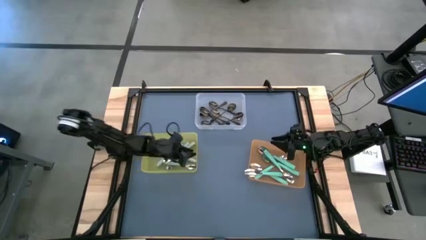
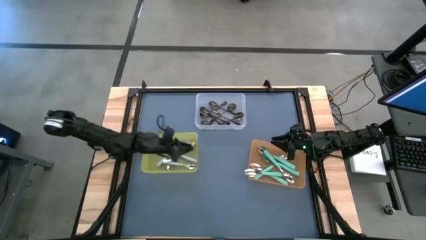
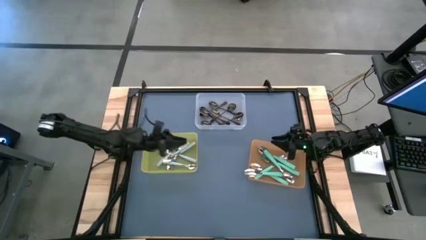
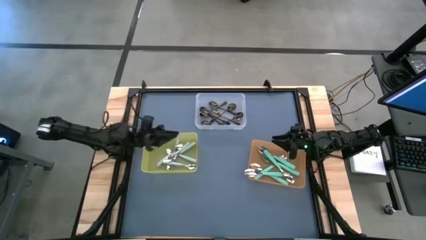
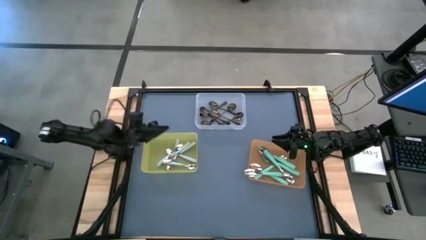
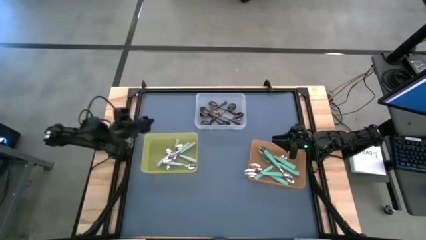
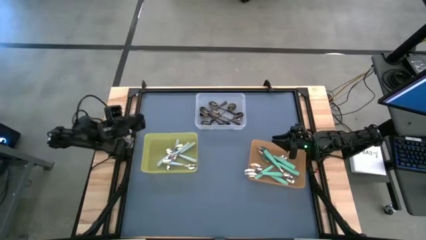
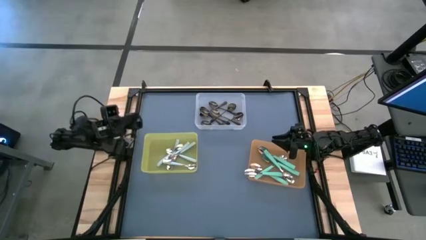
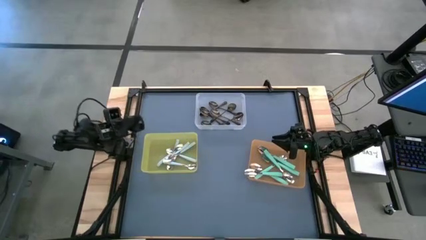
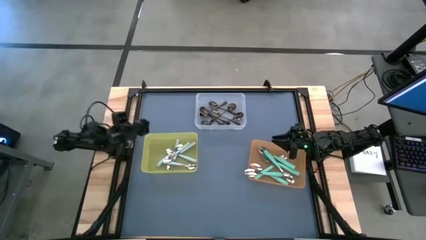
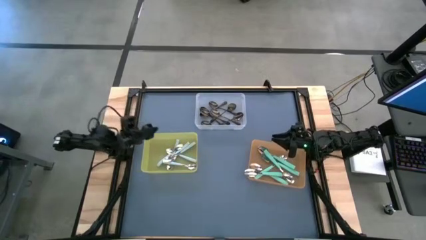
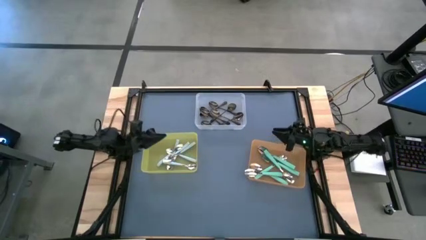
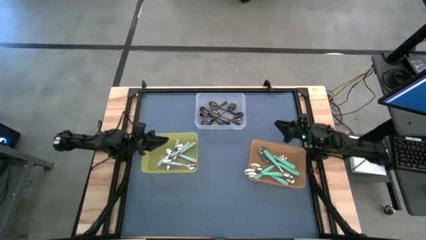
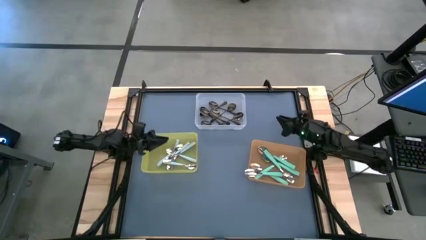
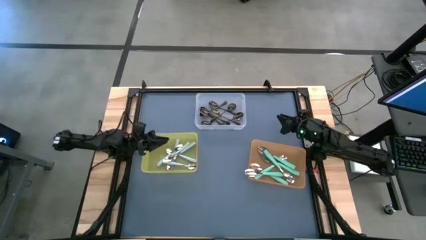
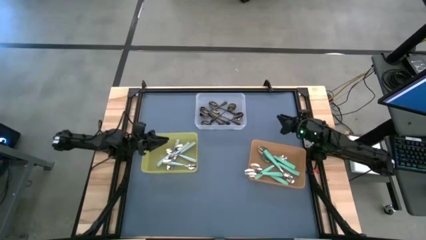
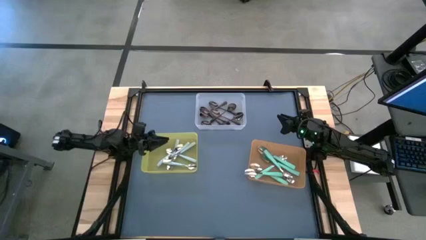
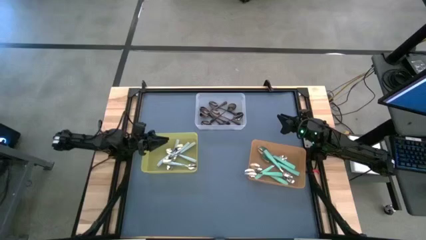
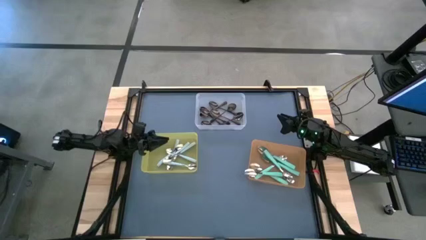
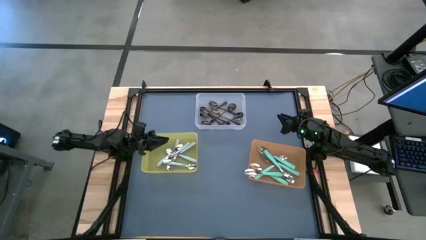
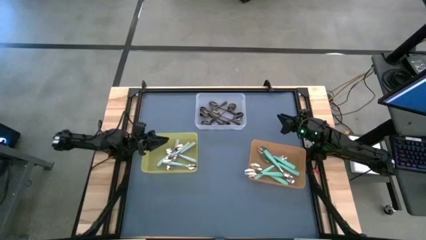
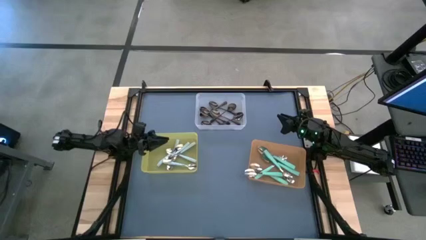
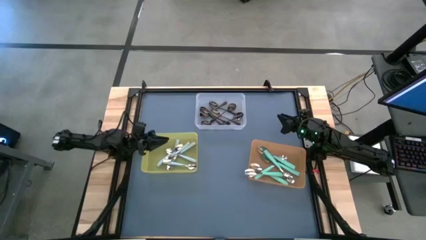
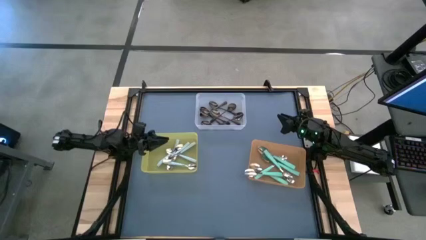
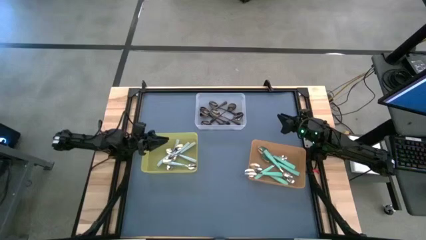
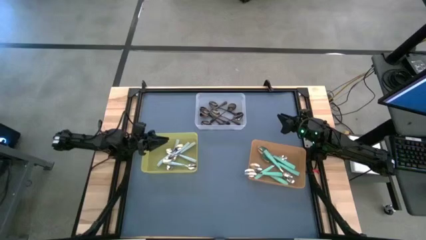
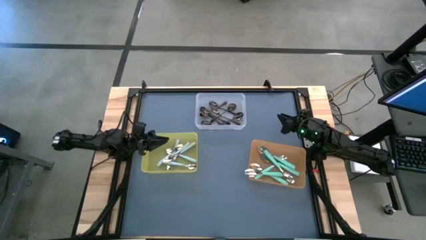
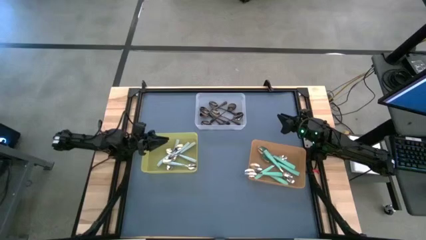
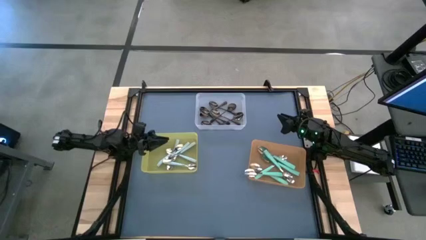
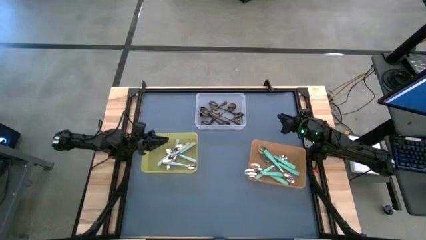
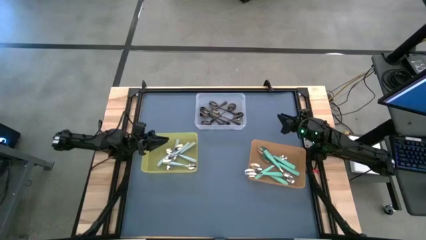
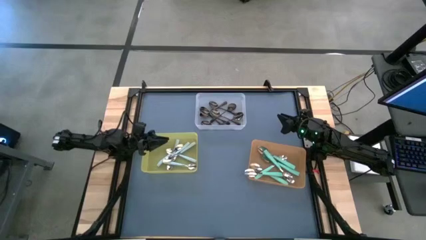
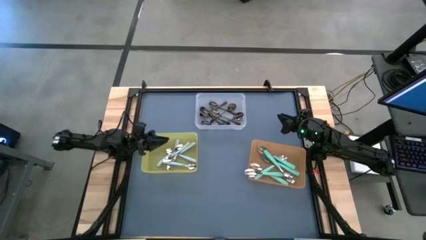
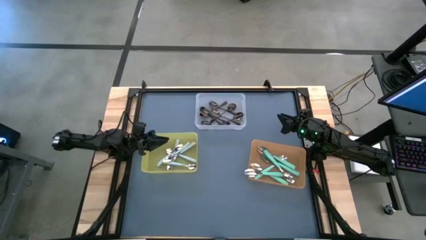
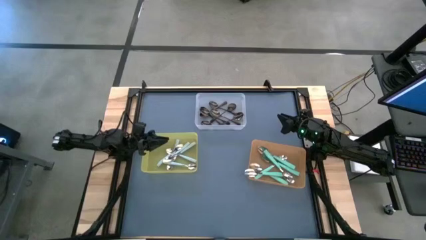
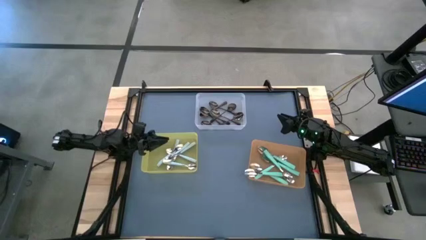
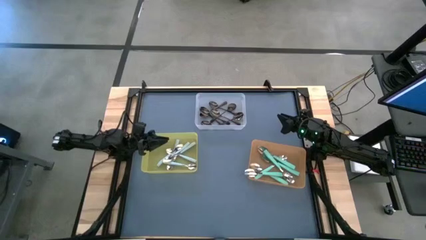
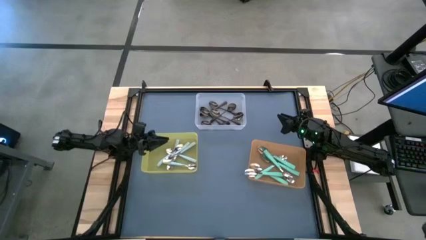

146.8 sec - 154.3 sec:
Task: Sort silverware by color (type)
Return to Home Position

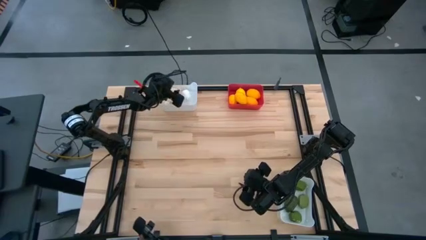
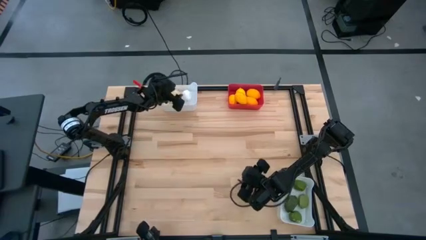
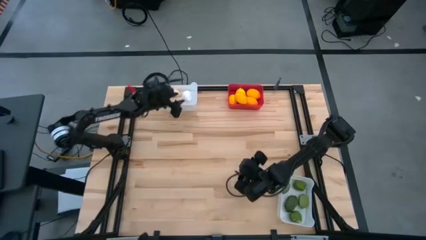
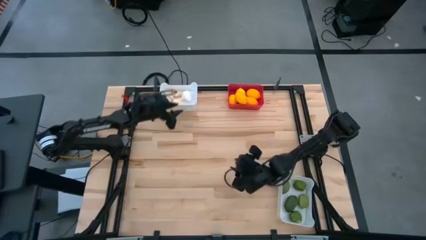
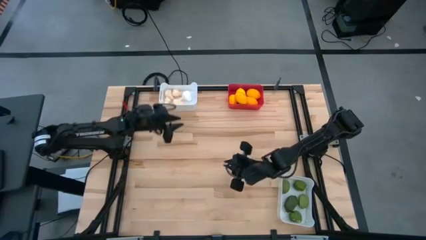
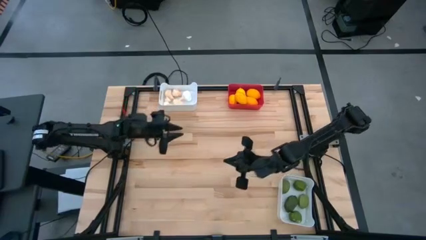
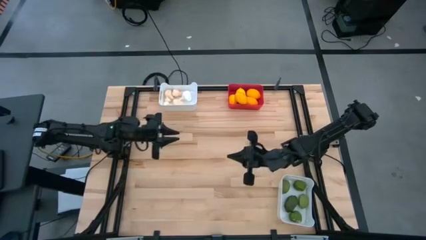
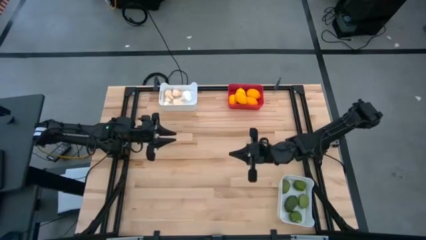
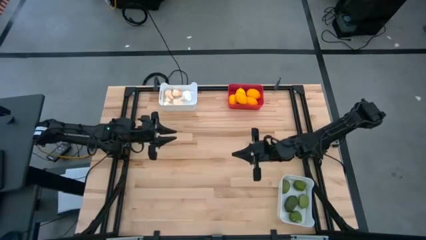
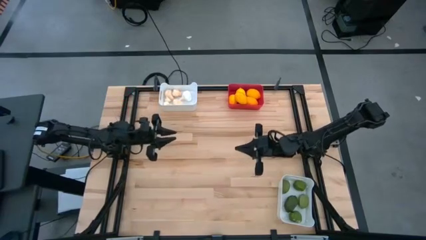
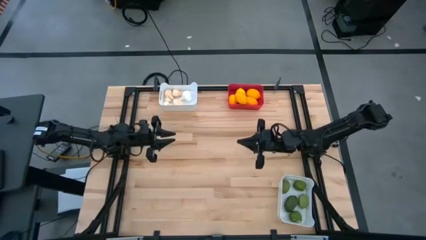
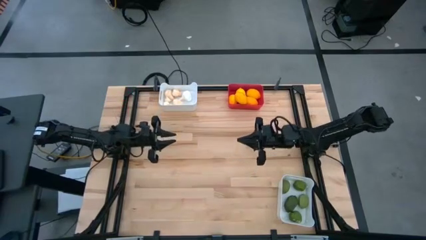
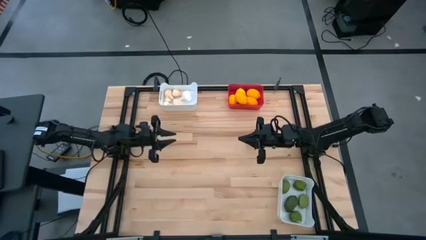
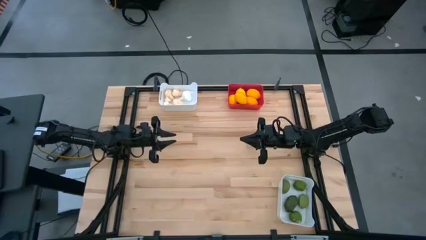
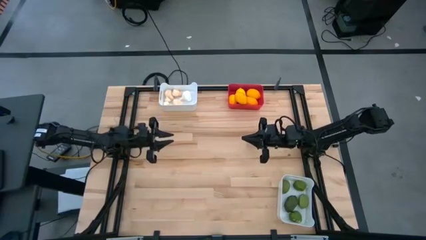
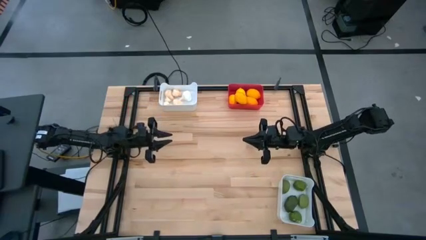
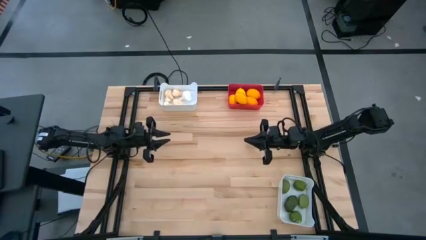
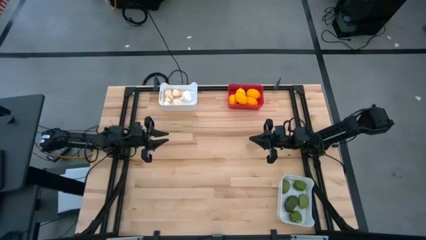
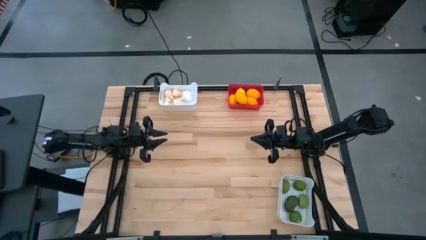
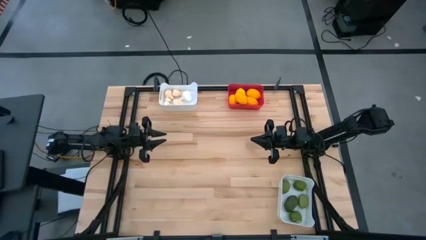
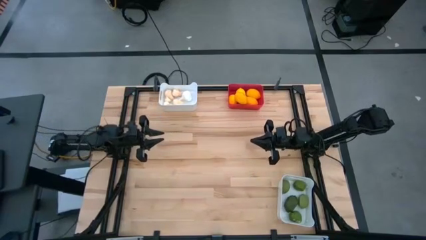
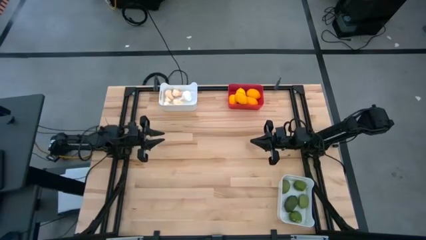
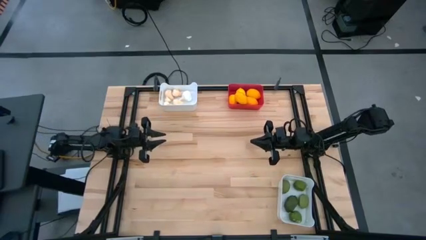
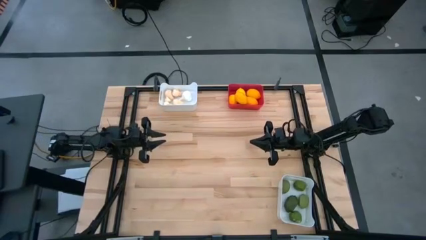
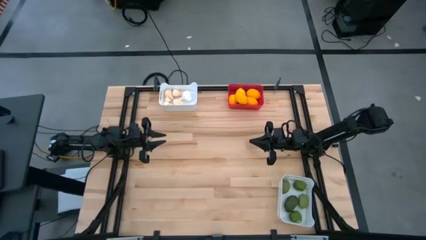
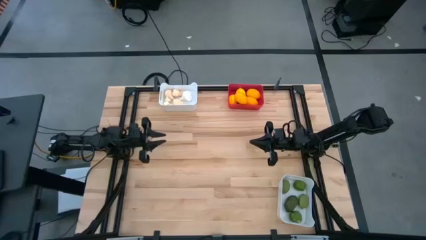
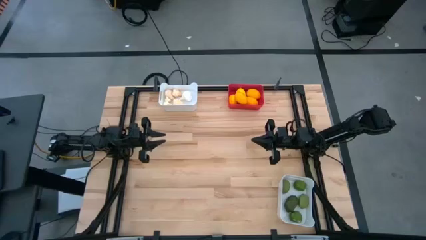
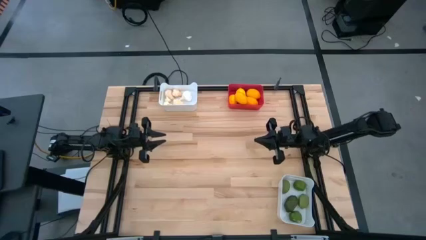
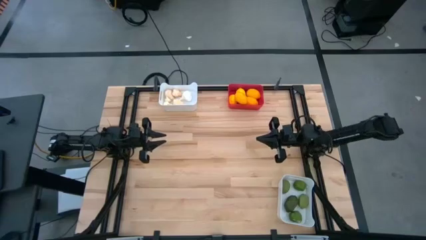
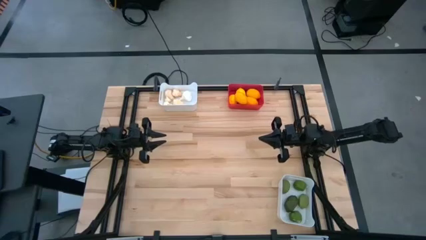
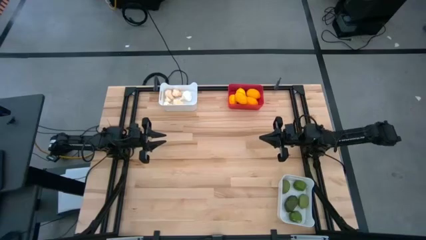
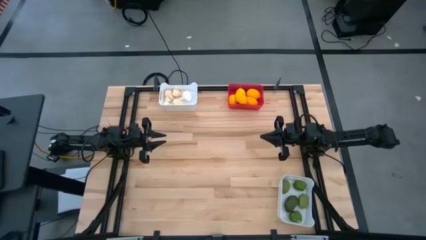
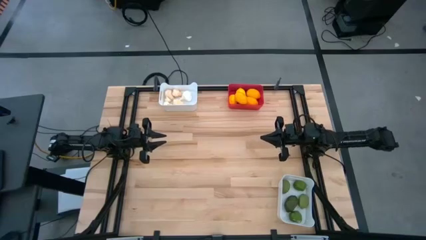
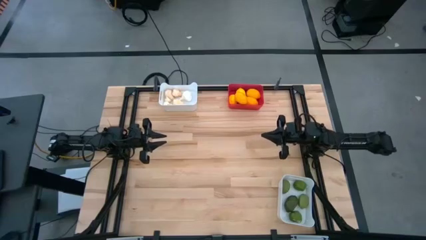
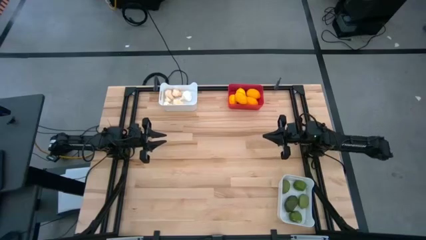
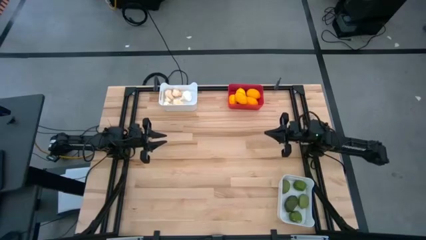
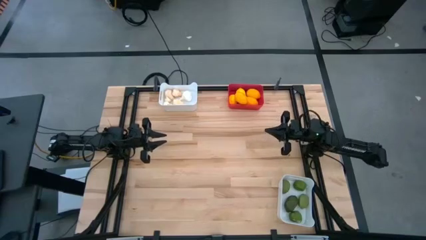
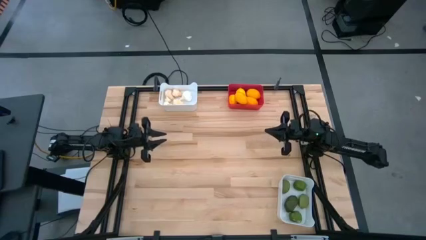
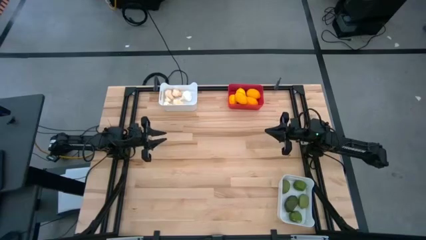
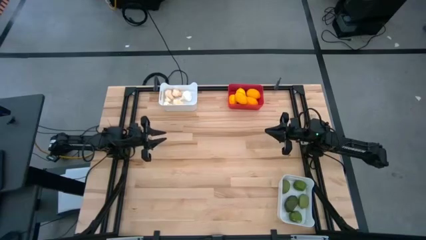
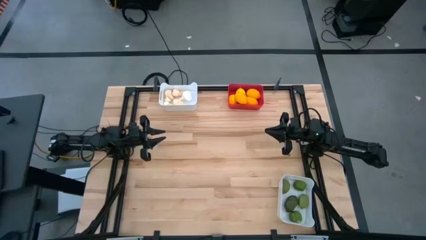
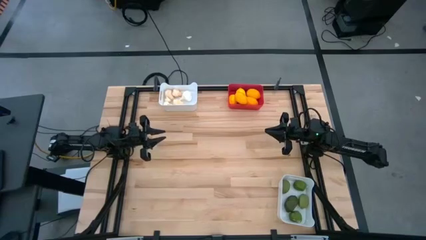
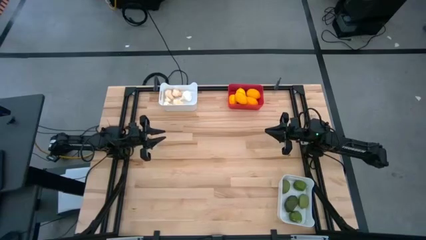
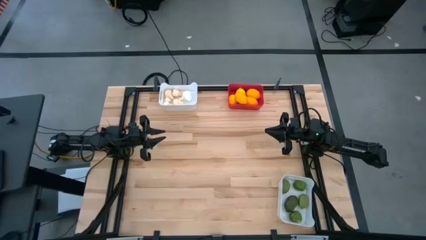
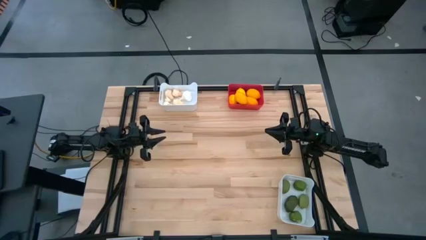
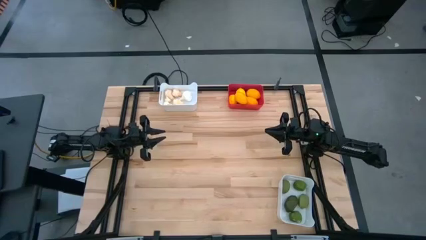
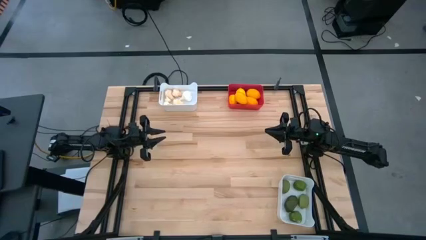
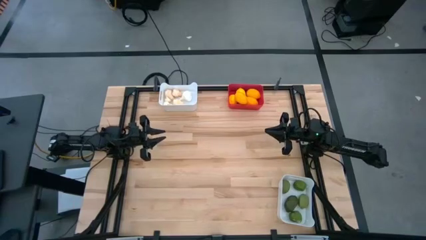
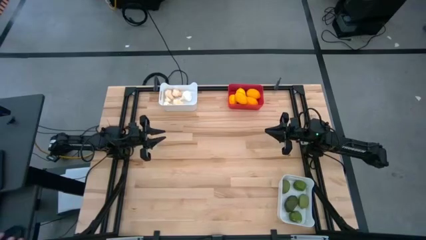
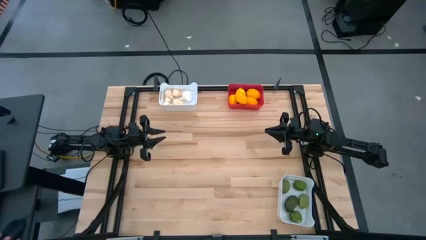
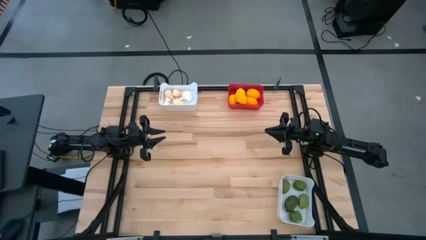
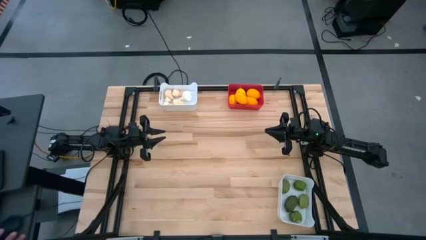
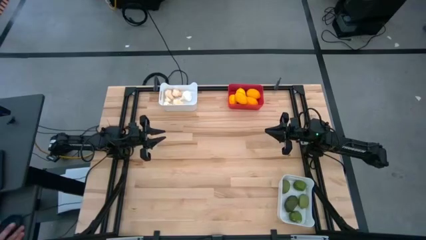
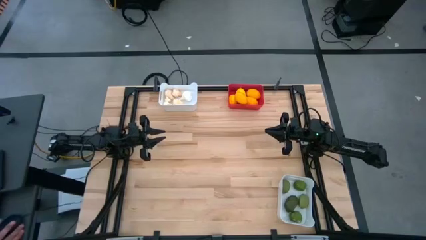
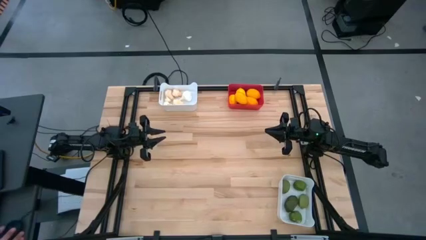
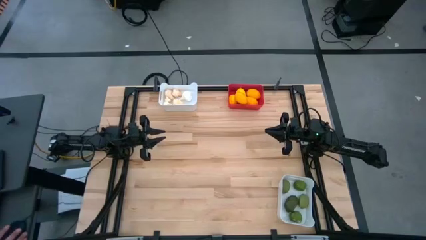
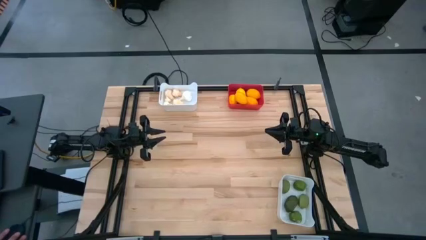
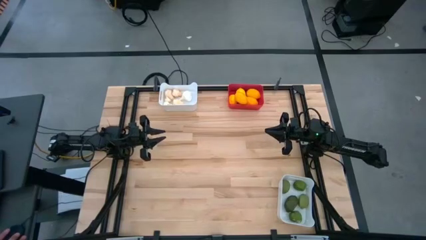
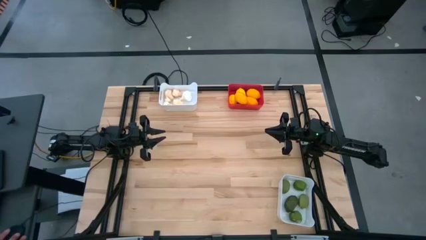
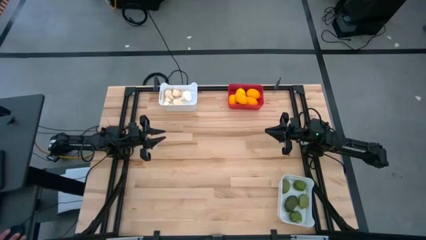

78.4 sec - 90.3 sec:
Task: Sort produce into baskets
Return to Home Position
